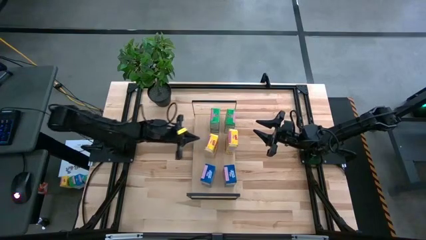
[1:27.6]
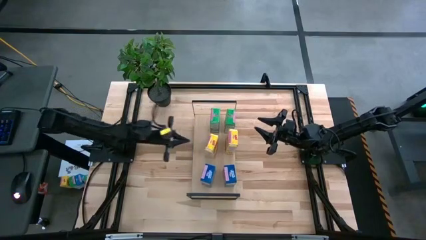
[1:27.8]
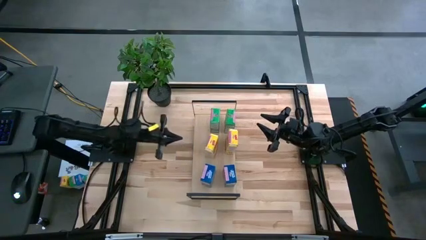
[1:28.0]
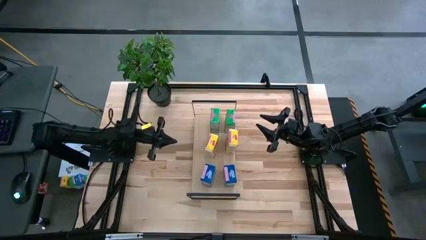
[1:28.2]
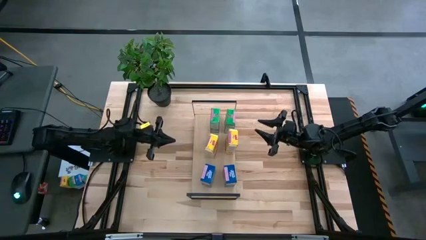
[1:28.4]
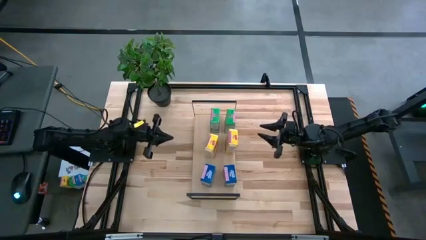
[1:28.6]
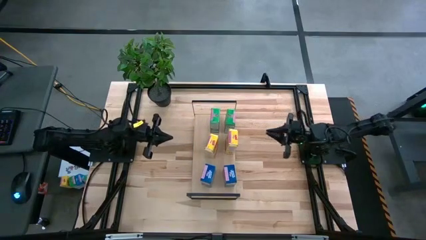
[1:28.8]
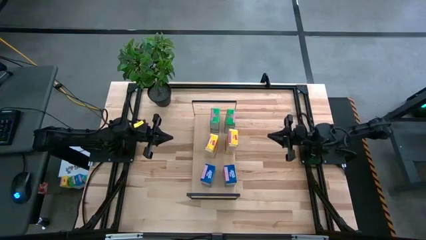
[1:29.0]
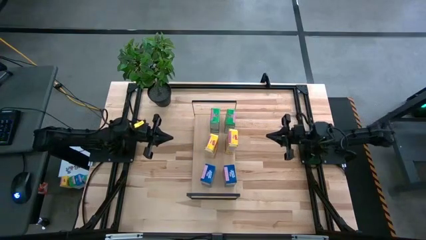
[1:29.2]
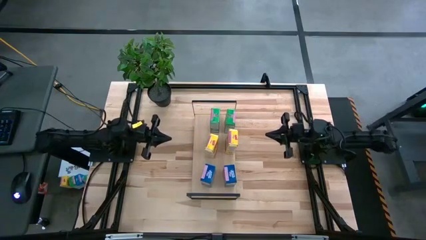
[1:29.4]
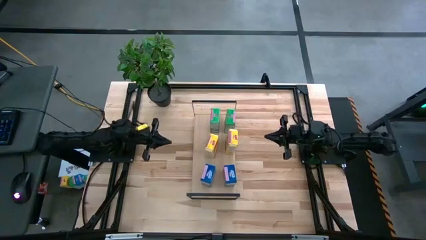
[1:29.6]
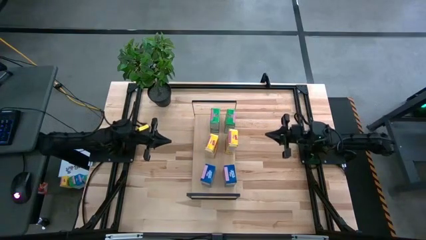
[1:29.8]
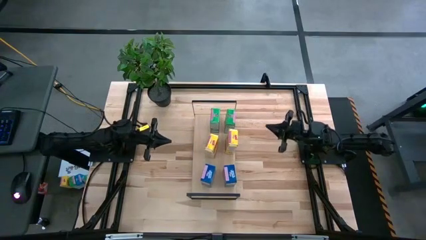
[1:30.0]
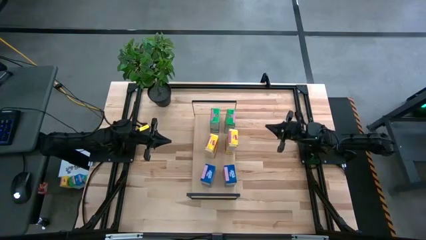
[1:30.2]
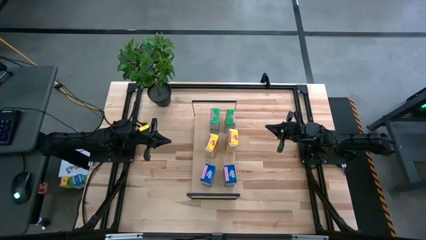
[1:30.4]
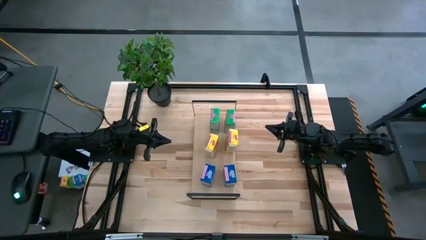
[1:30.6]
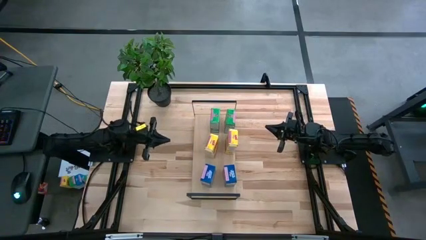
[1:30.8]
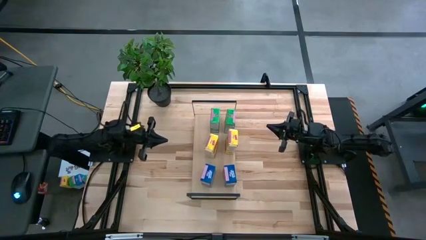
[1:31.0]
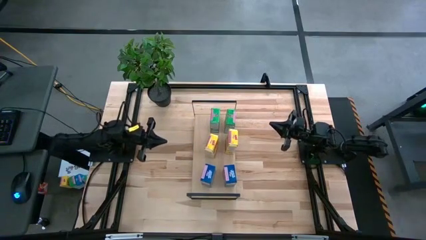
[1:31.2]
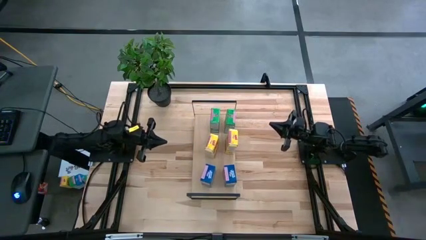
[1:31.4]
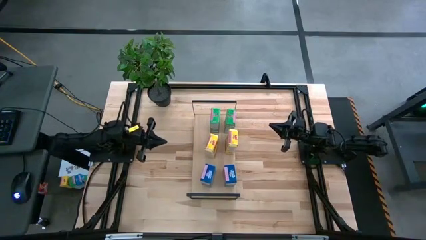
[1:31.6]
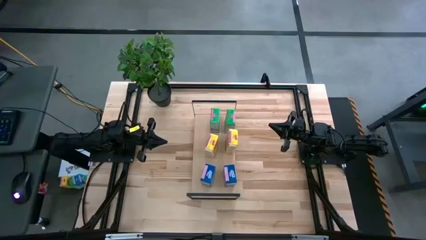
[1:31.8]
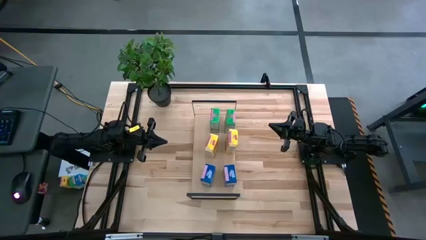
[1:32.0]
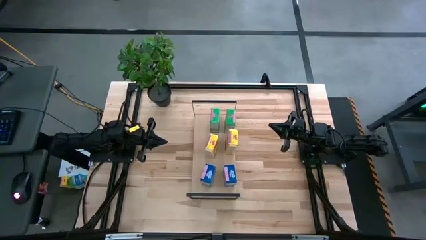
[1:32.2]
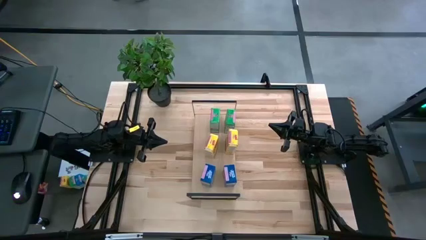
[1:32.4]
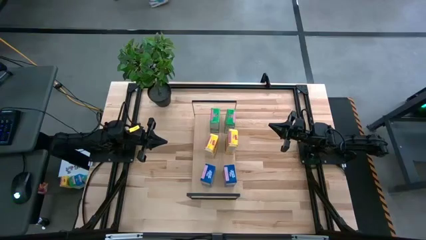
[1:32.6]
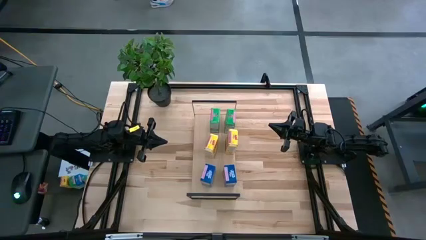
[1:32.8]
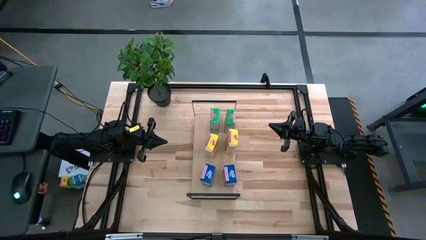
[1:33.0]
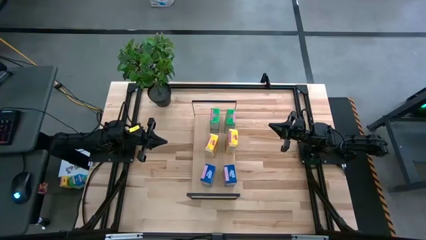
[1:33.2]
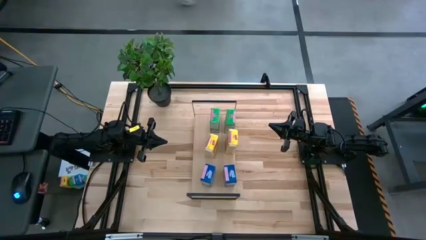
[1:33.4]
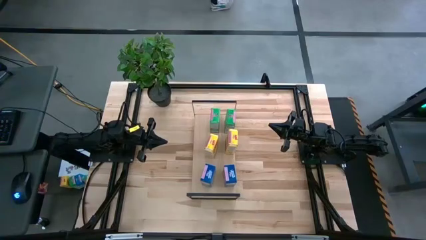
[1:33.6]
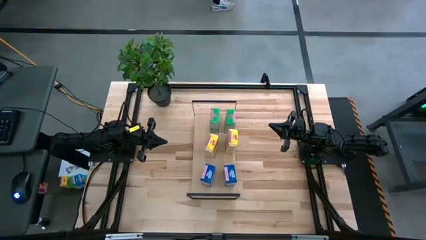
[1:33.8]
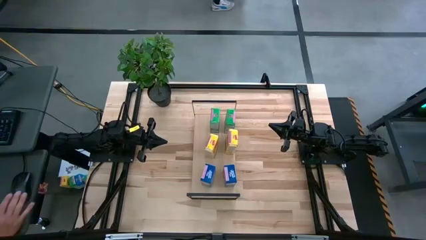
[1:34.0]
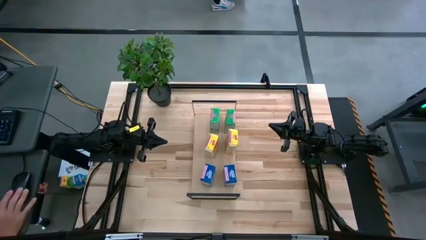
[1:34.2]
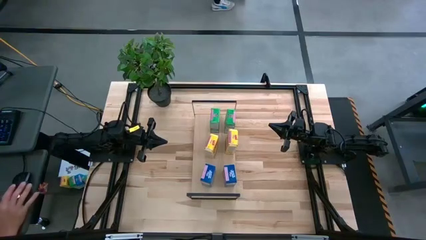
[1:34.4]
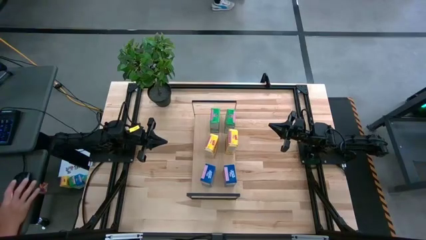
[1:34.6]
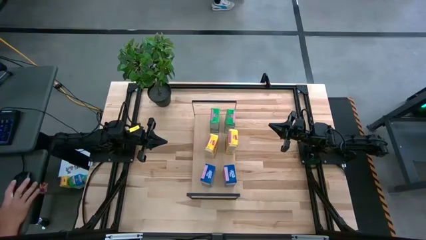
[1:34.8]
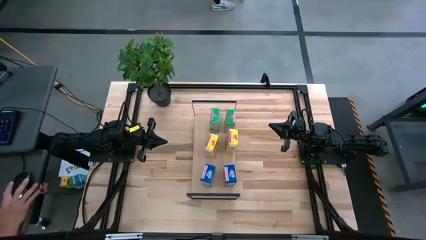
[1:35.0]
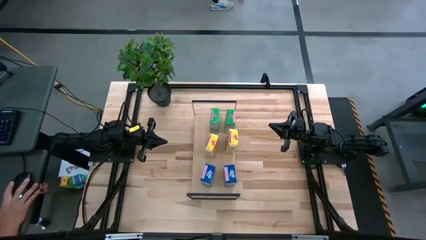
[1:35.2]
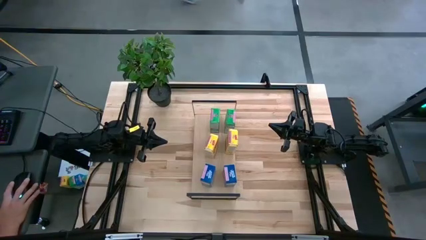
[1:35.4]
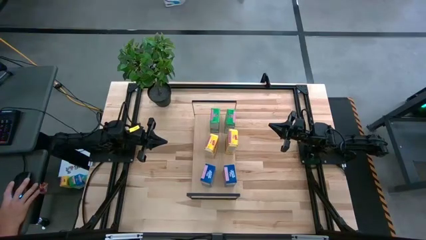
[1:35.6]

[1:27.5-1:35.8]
Task: Stack cereal on shelf
Return to Home Position

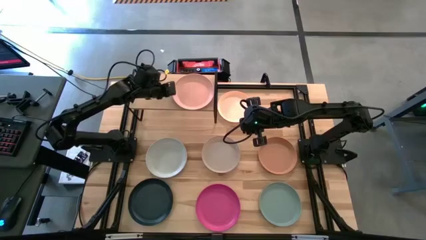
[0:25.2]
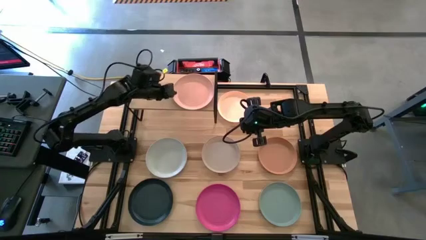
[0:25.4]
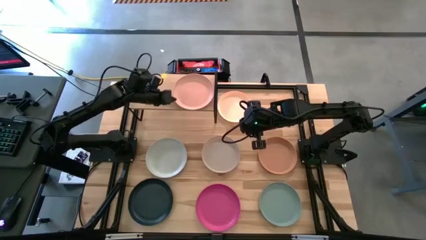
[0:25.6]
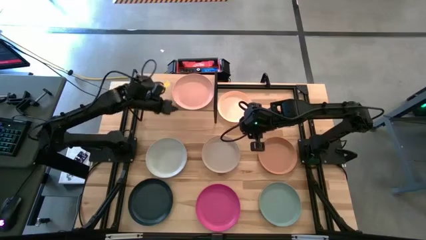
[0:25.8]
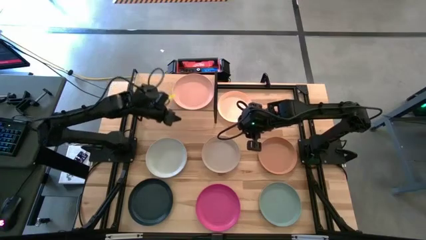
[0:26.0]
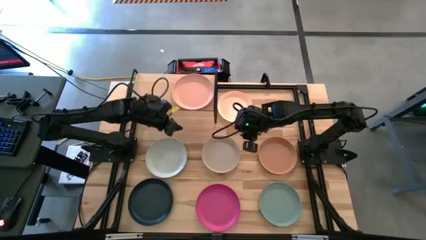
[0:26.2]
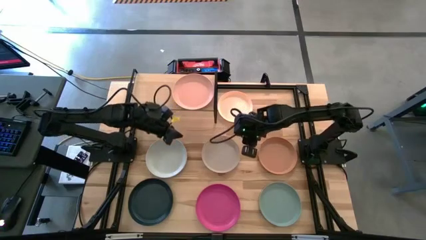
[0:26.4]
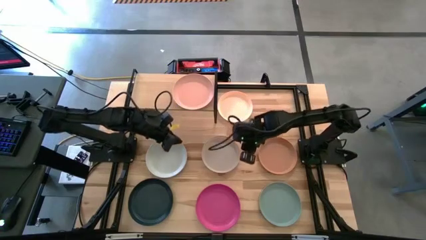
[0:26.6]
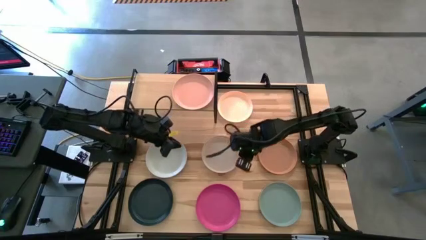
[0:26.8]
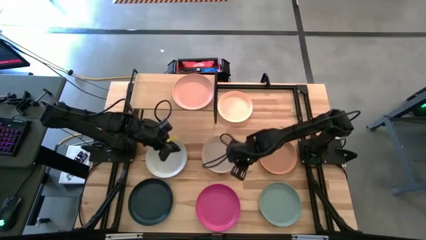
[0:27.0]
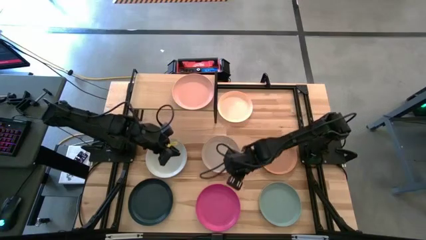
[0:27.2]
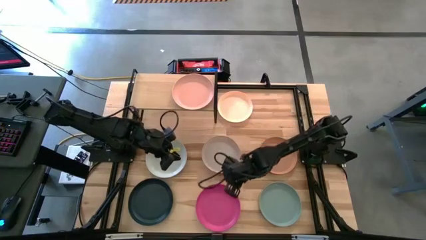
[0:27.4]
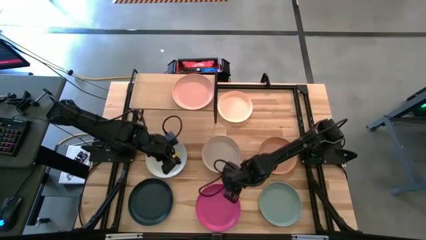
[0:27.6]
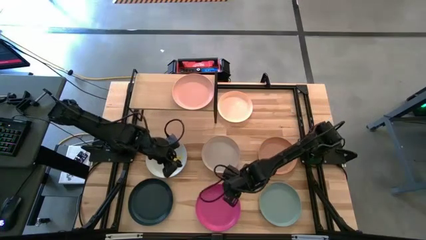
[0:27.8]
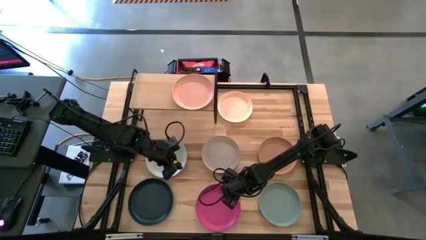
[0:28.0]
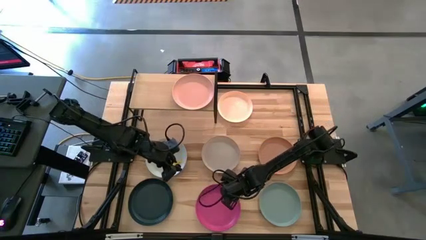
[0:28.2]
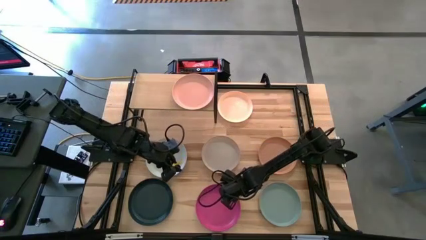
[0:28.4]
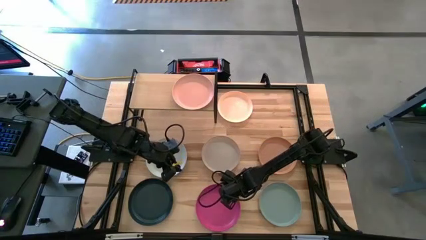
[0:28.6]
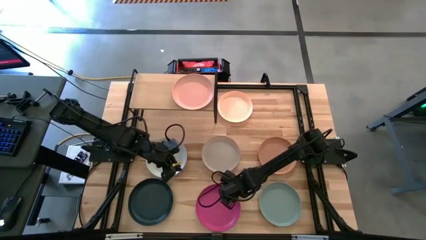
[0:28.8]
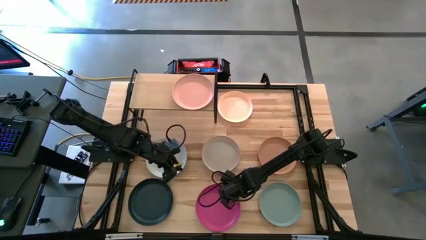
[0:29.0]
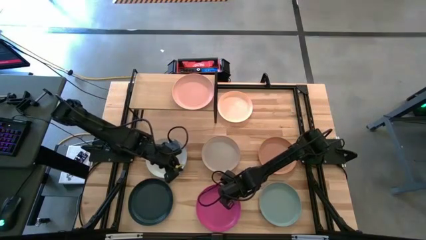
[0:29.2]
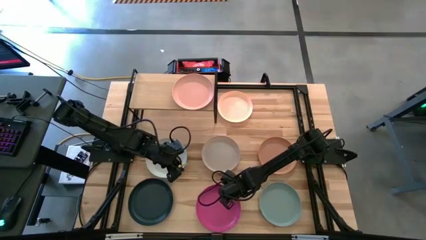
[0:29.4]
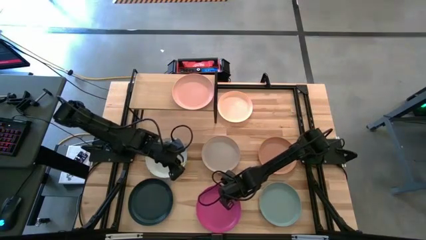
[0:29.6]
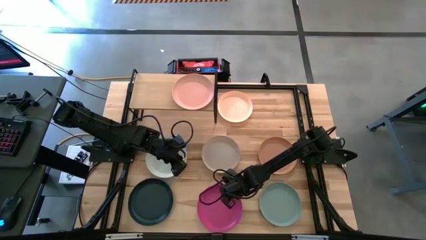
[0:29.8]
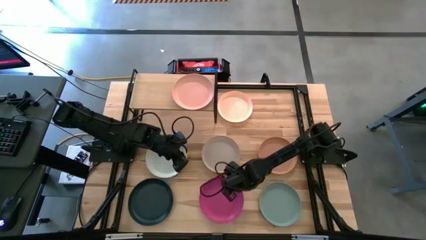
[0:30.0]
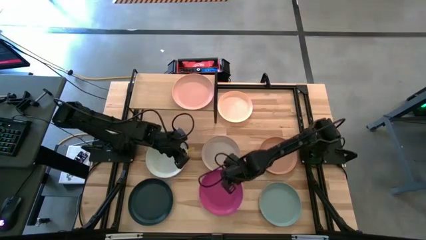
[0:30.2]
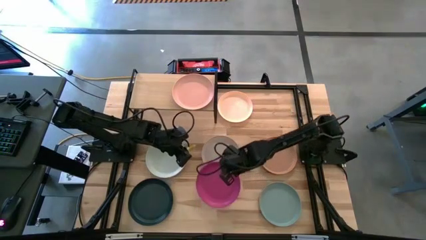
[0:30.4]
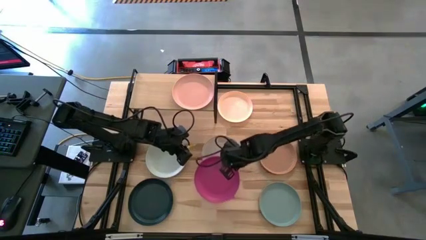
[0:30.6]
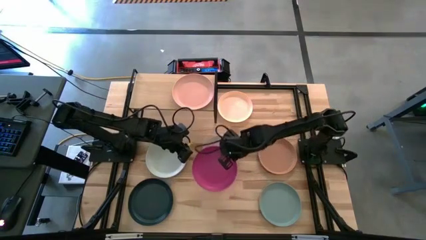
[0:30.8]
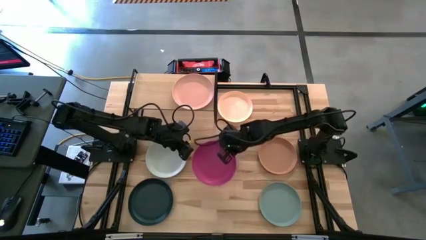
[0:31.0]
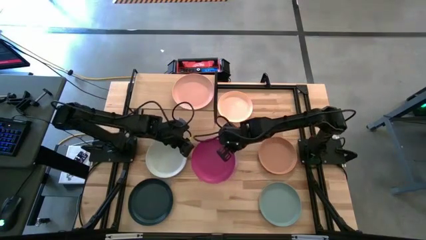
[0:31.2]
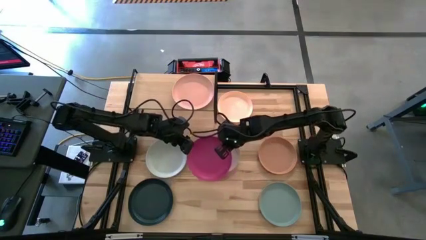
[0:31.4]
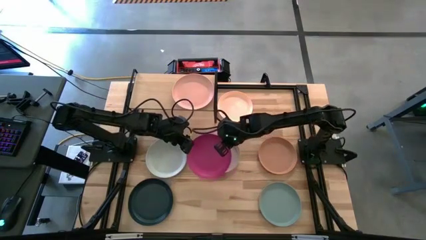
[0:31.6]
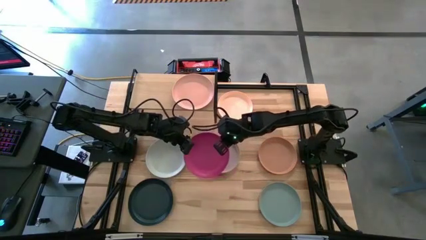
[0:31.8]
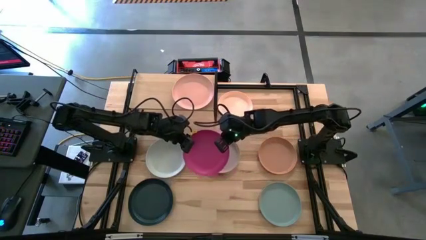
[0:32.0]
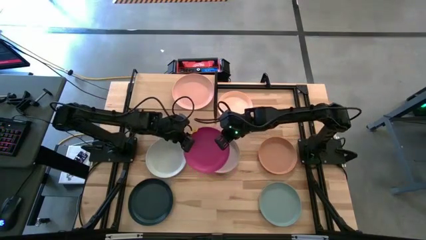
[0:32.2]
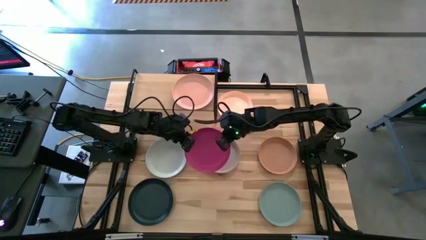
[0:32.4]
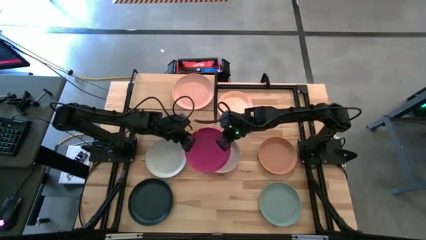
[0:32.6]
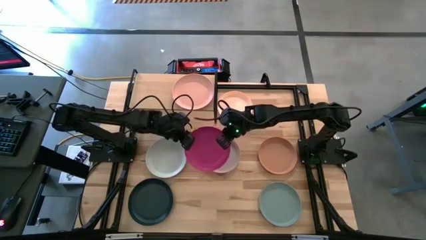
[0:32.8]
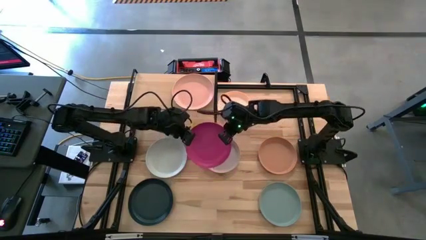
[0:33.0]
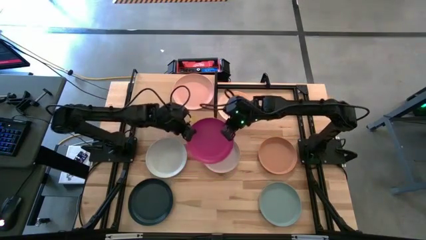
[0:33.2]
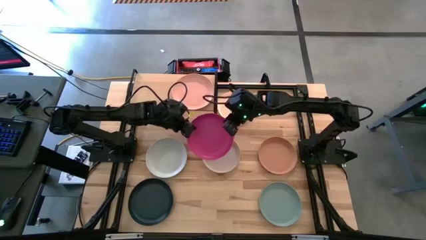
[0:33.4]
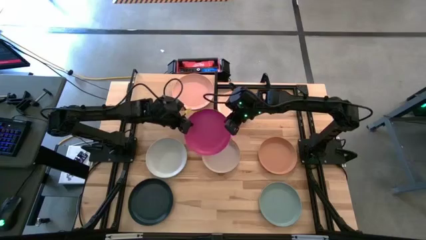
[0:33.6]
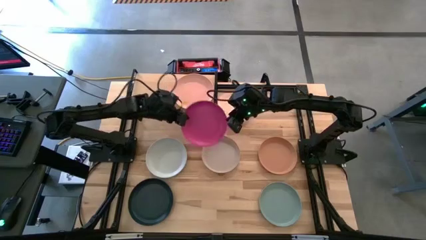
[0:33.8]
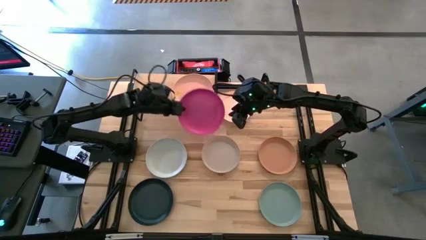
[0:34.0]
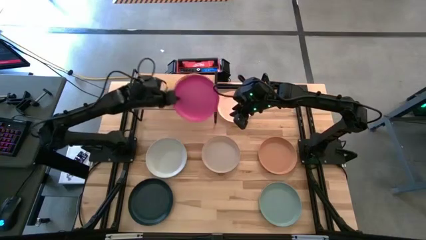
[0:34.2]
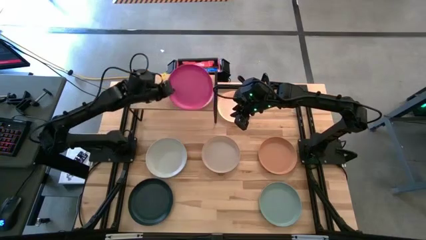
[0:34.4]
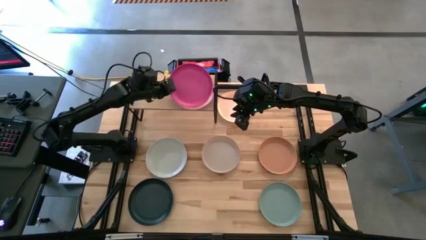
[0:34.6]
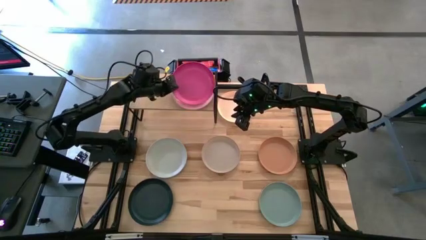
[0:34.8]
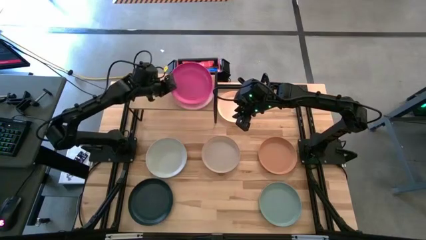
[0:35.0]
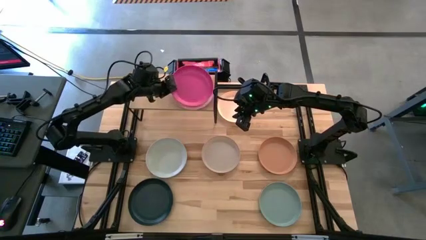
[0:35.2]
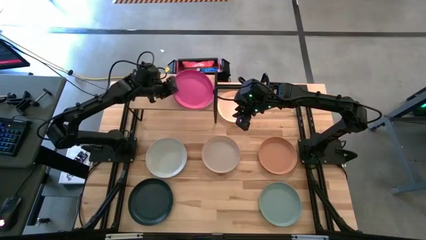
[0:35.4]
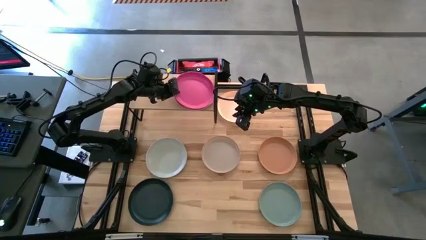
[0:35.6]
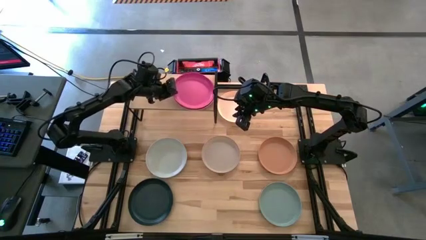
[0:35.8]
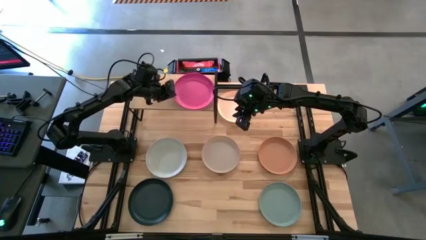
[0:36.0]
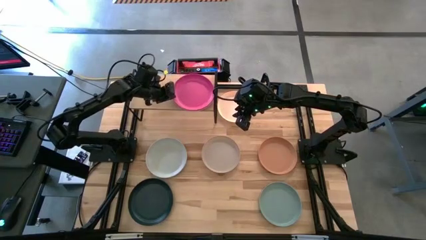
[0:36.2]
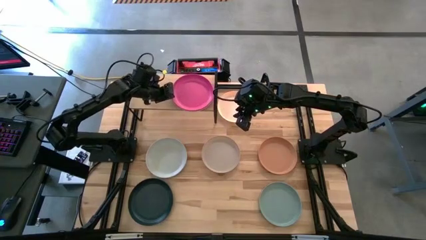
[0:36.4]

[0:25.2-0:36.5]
Task: Place and stack plates onto a shelf
Stack the pink plate on top of the light pink plate on the shelf
